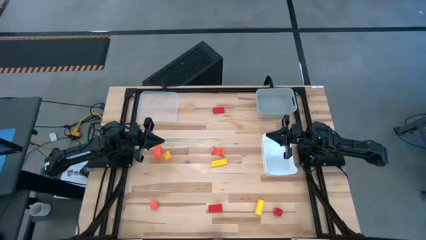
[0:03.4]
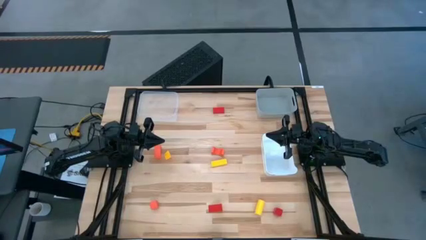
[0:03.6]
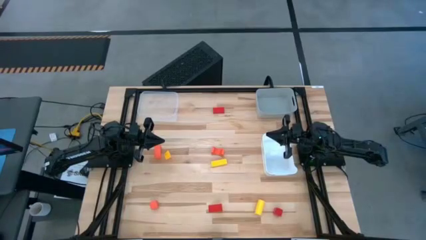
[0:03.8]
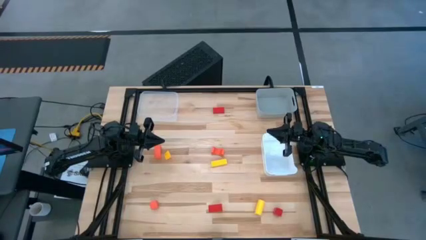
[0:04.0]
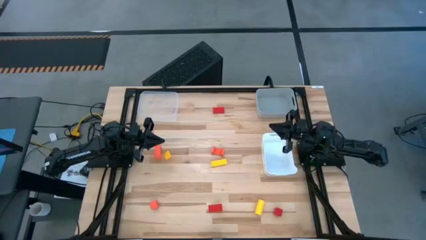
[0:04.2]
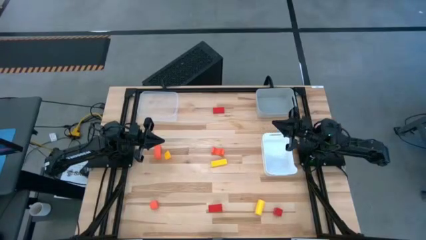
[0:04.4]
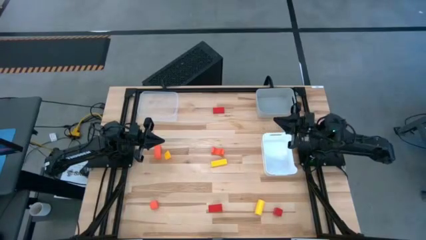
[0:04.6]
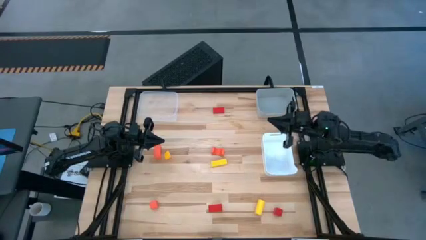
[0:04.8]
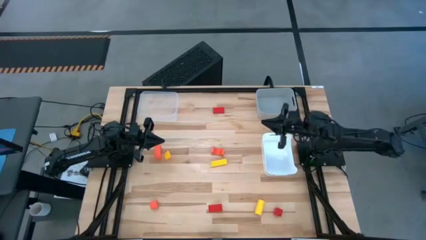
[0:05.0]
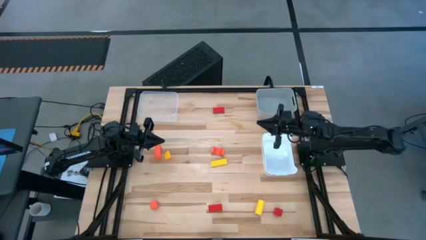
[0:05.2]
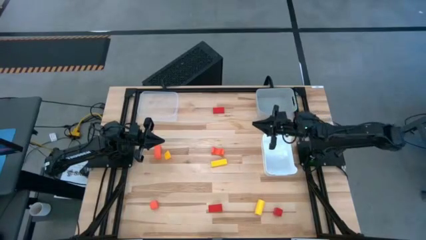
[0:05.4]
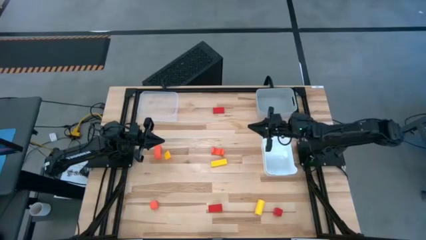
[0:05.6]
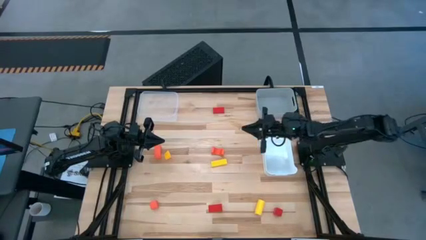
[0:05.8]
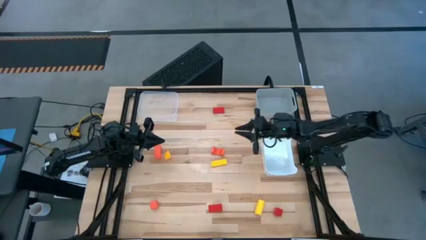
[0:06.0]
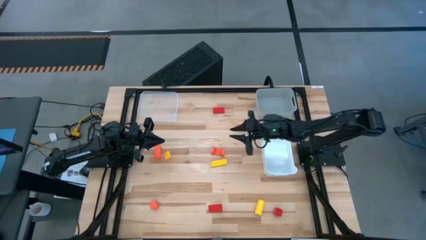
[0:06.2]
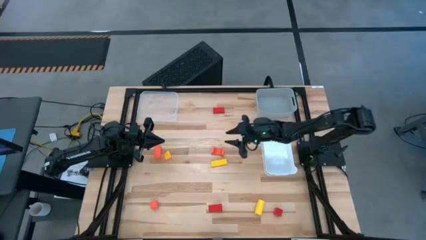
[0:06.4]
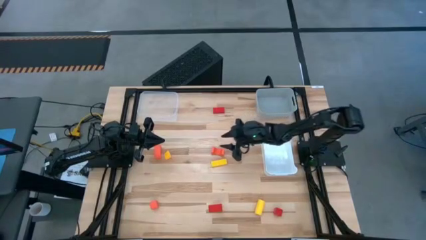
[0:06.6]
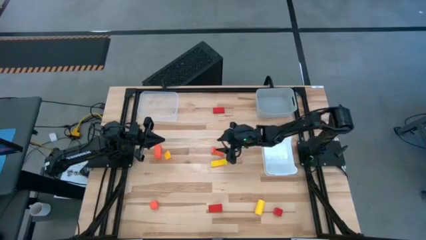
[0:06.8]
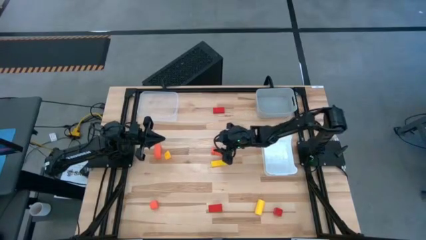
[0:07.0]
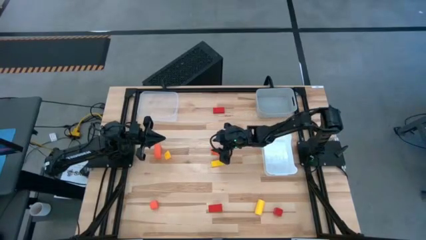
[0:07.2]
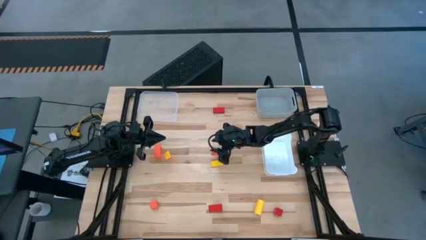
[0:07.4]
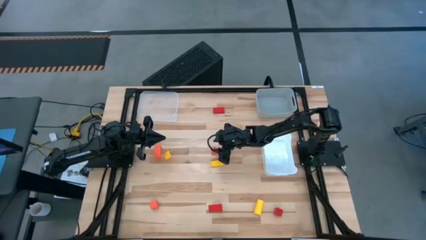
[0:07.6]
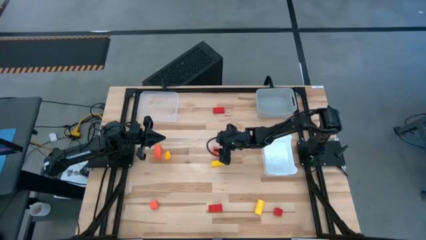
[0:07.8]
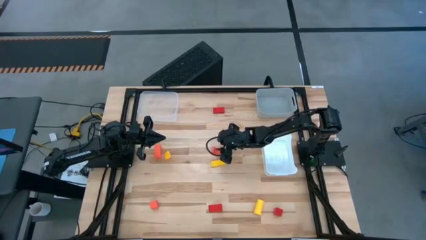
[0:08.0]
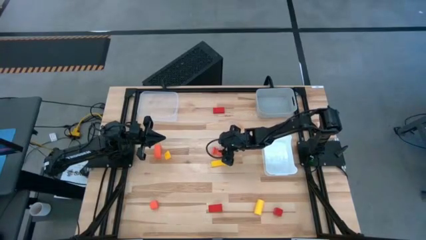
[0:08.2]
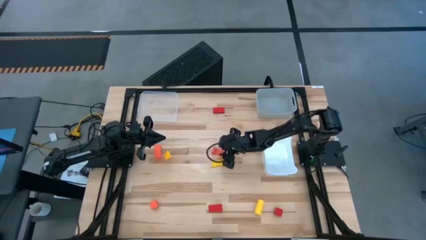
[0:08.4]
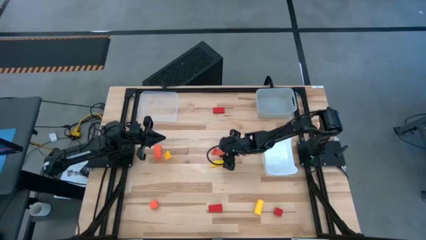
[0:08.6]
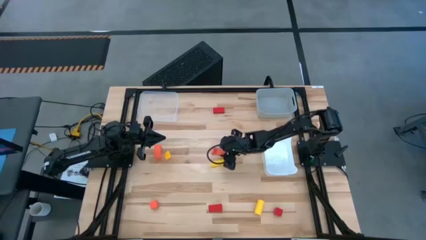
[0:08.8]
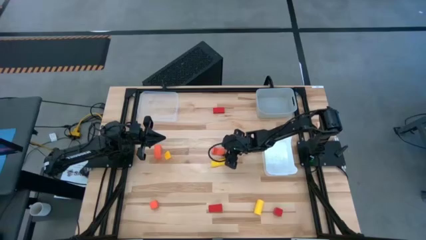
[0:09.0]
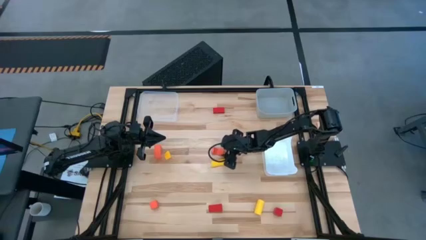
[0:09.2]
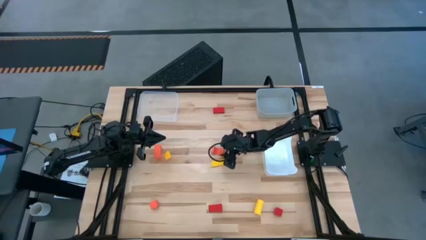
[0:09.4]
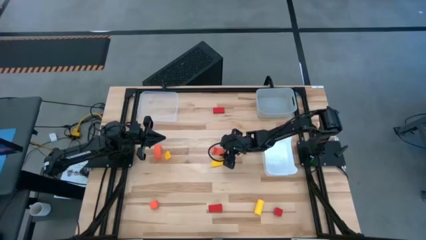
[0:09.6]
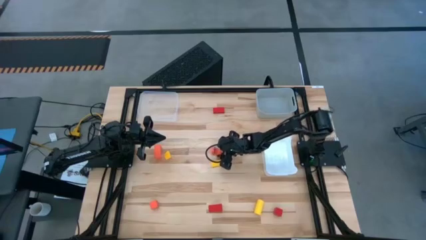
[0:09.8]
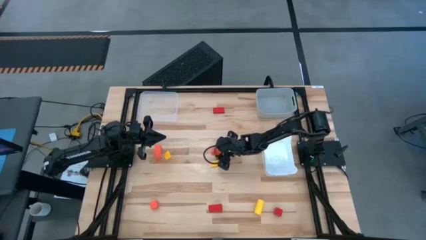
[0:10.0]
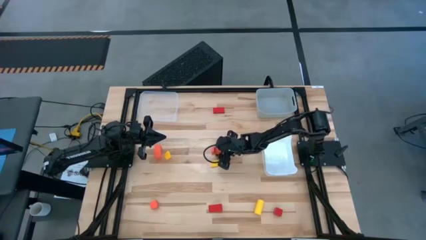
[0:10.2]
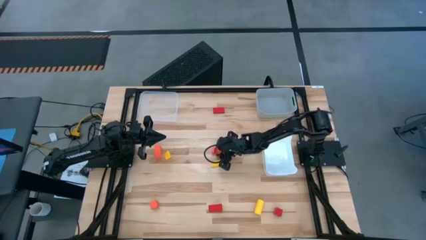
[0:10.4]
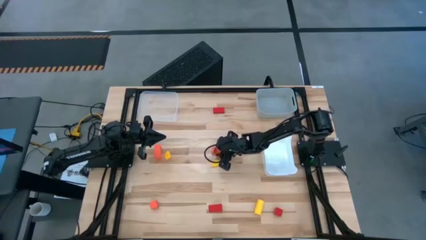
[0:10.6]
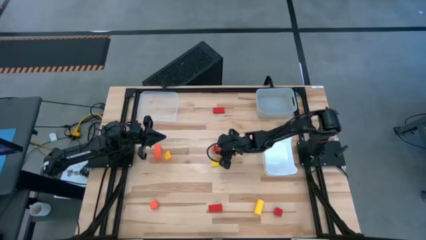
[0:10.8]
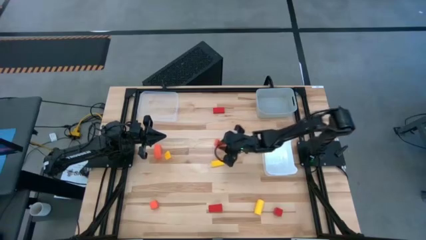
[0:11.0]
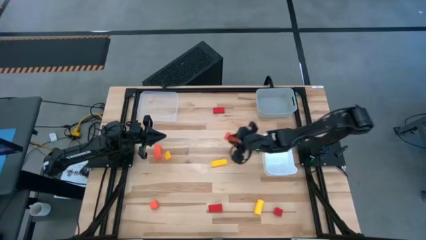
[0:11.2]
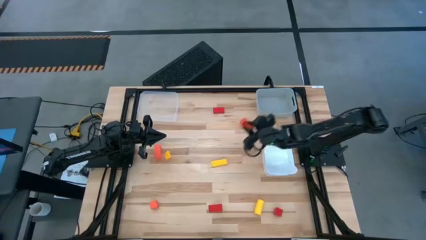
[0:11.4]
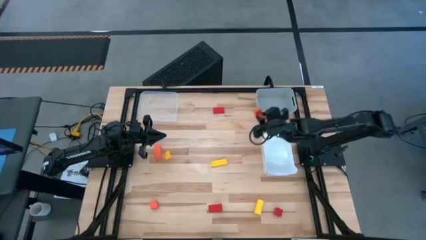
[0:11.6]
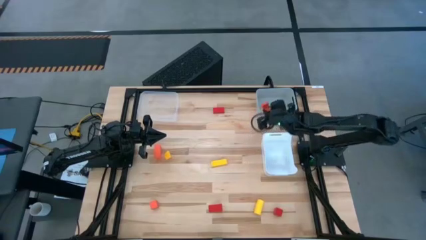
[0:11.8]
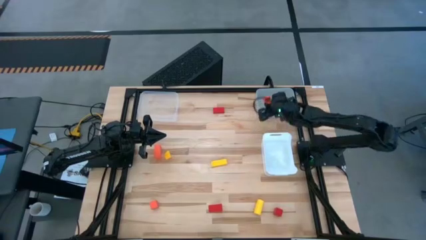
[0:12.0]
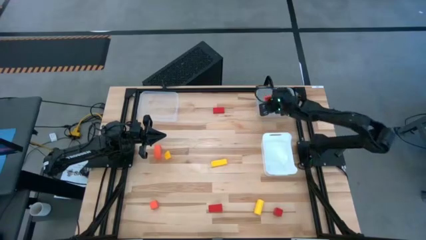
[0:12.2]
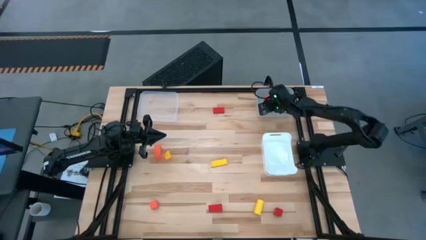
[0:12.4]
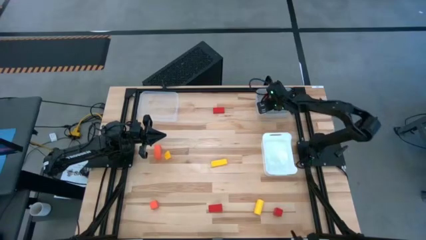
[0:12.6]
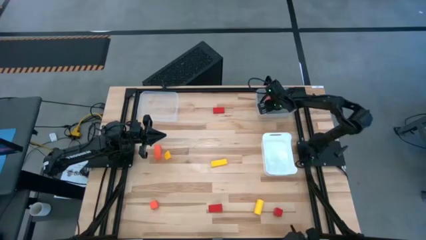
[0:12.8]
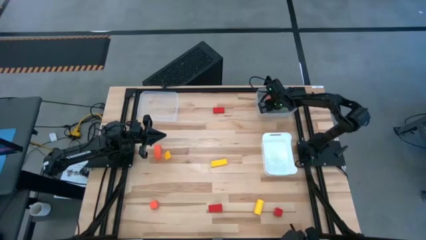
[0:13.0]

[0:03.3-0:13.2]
Task: Sort & place blocks by color
Put the top right orange block into the gray bin

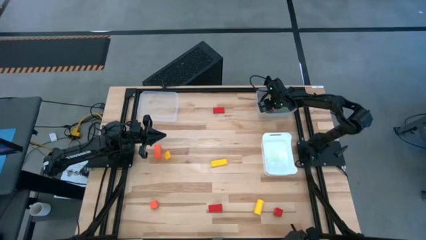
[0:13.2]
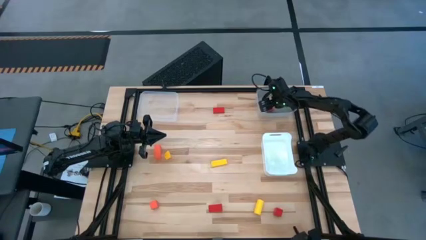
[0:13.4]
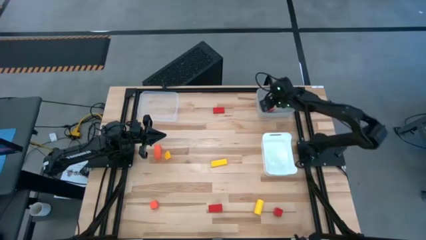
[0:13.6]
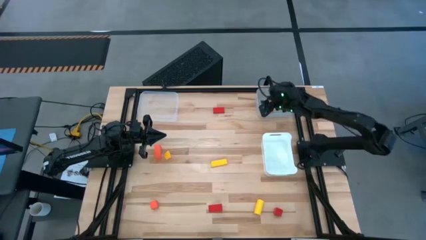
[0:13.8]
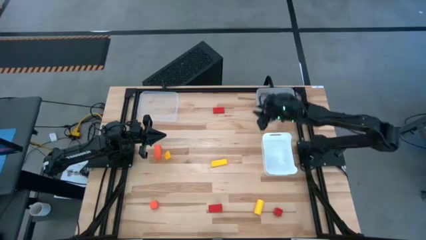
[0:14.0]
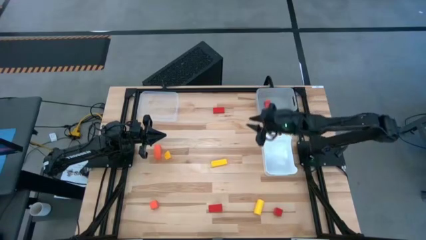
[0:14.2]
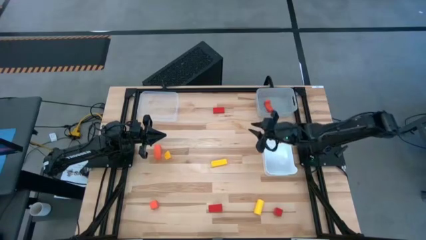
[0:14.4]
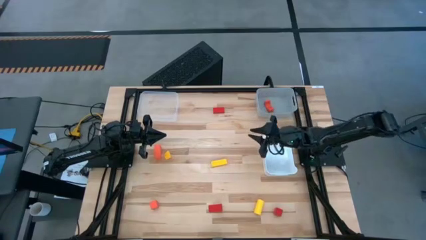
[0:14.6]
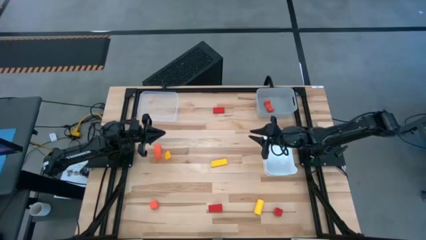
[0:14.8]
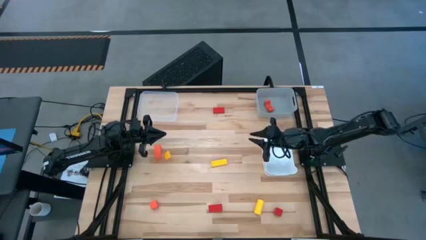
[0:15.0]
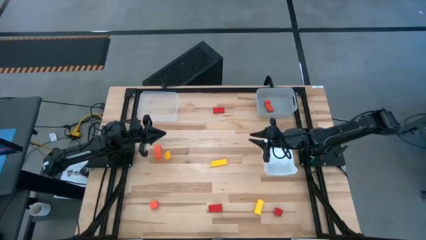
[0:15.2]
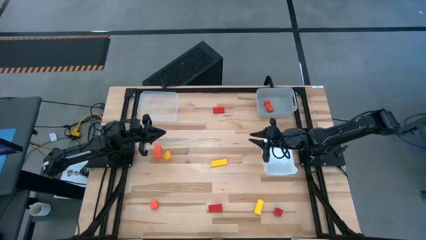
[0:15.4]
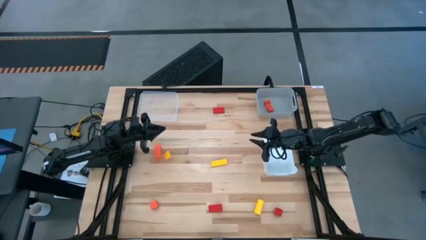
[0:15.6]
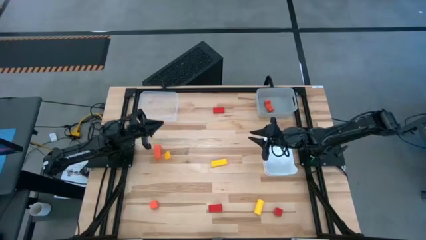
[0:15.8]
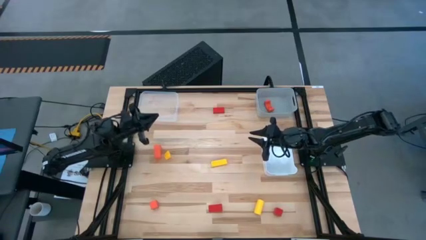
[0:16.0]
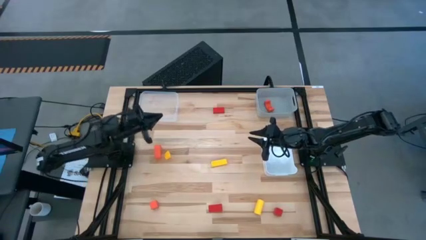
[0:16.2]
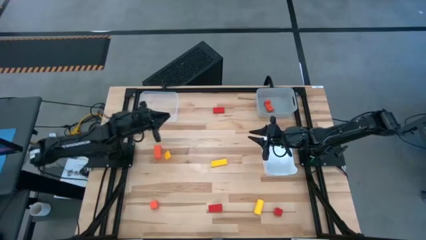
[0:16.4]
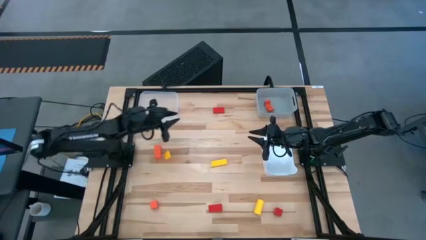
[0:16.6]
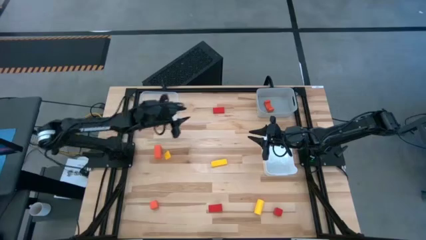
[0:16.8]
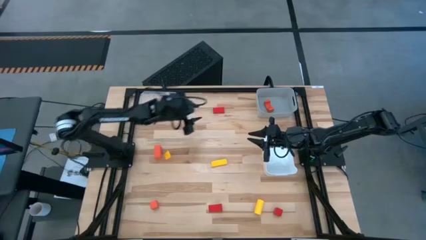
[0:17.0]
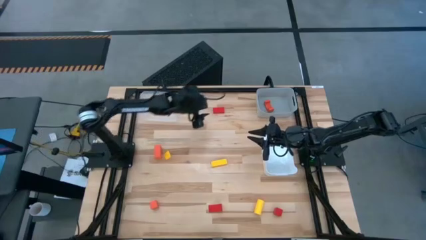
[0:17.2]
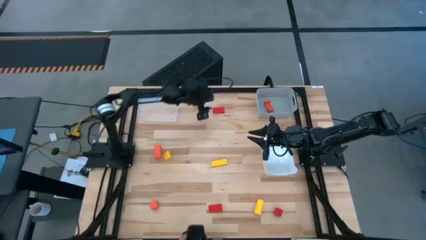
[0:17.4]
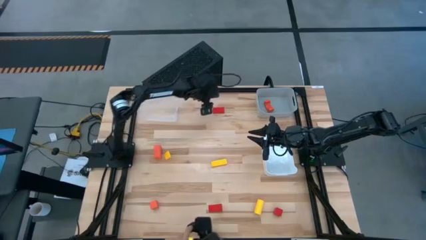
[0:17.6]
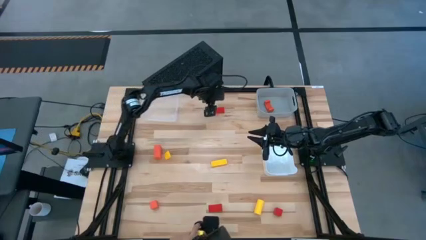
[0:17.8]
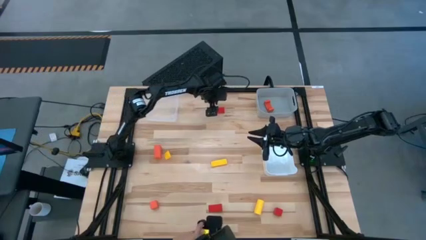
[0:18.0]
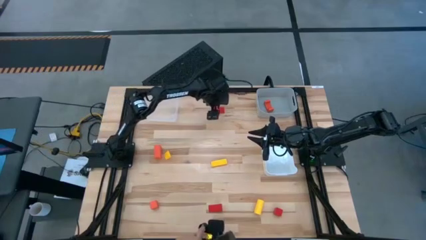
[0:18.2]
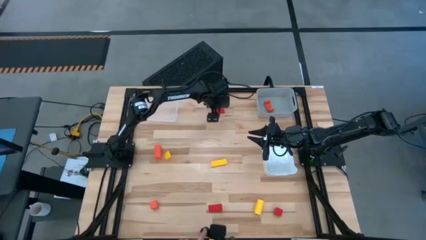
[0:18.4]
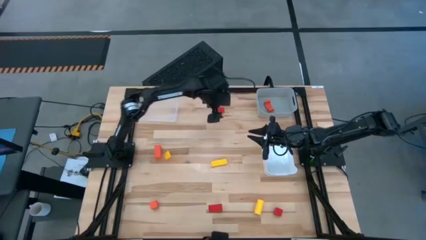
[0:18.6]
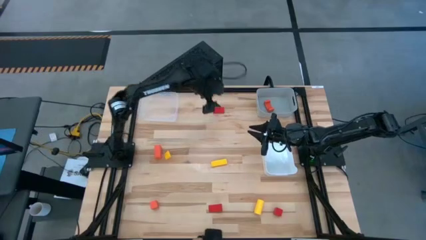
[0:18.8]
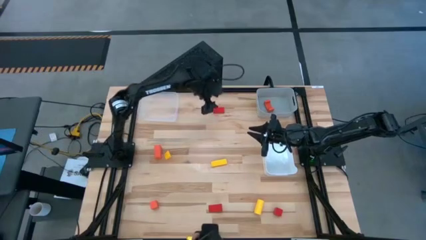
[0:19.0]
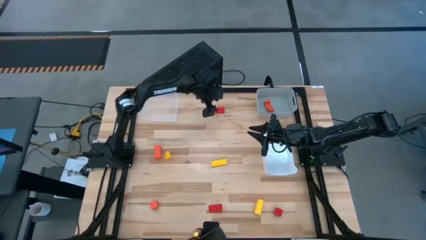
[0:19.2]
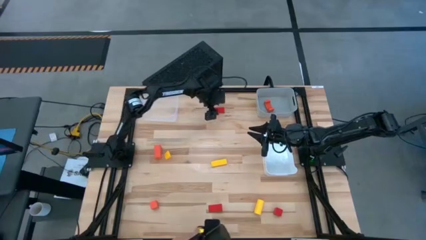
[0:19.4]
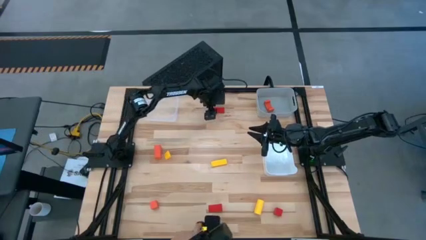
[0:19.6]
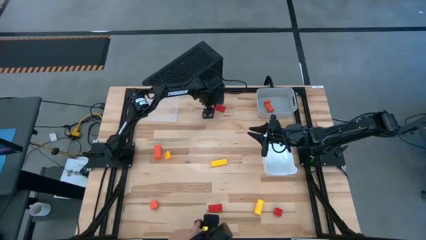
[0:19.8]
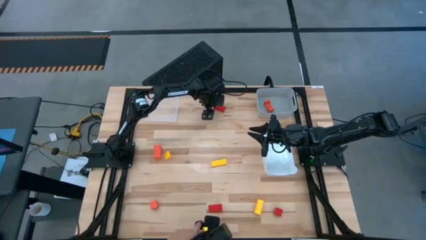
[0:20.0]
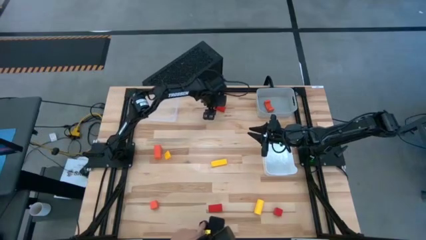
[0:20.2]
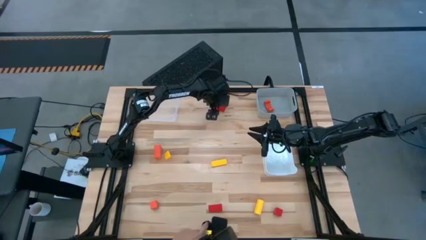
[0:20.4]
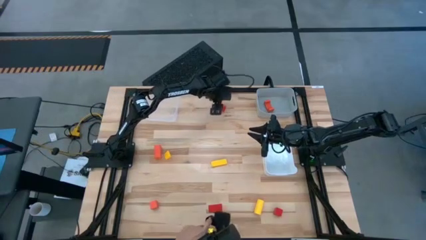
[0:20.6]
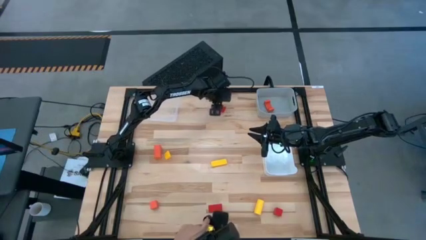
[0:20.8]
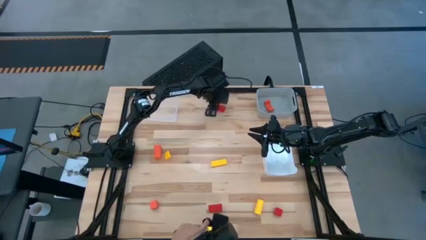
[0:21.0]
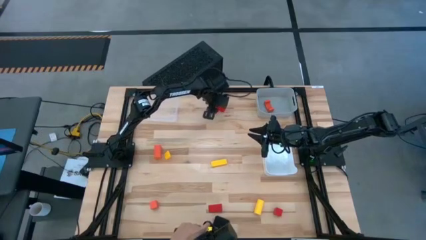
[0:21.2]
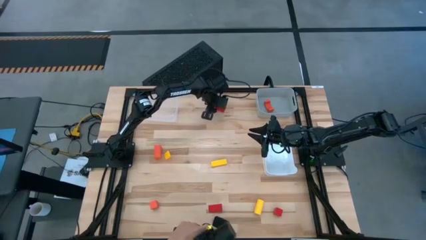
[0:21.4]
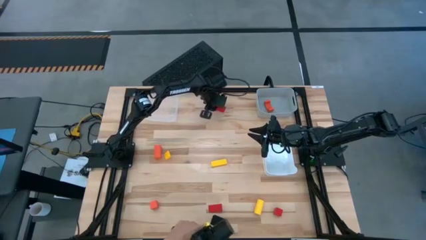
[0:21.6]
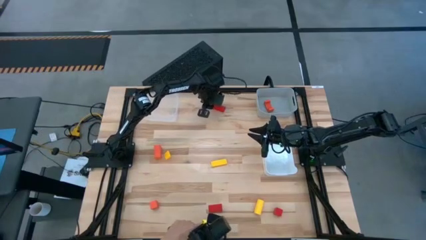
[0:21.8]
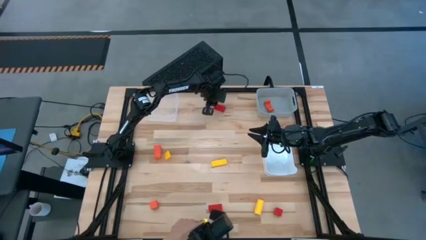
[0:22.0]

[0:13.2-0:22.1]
Put the top left red block into the transparent bin
